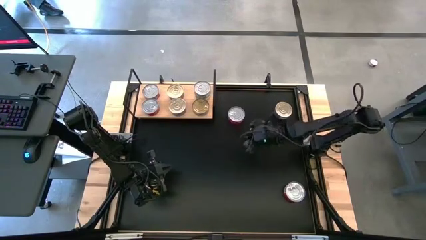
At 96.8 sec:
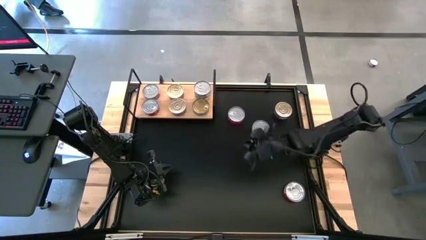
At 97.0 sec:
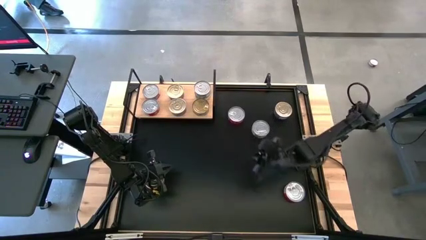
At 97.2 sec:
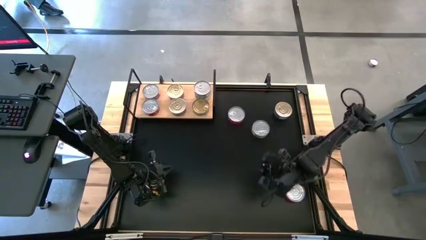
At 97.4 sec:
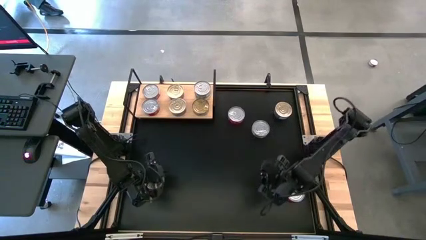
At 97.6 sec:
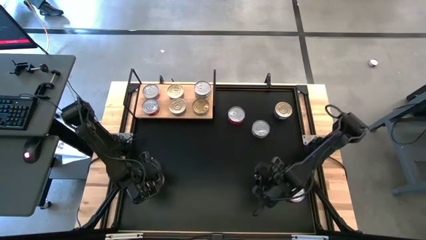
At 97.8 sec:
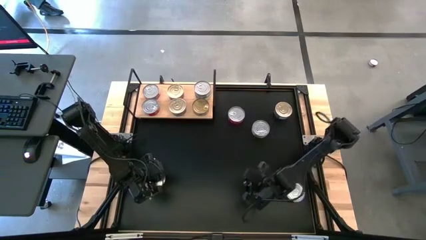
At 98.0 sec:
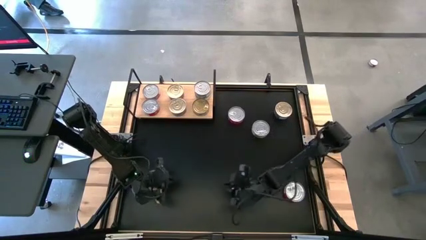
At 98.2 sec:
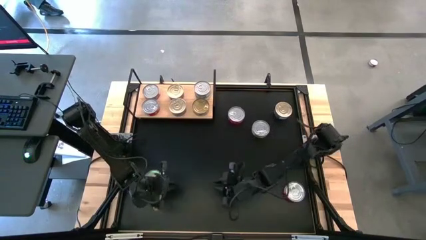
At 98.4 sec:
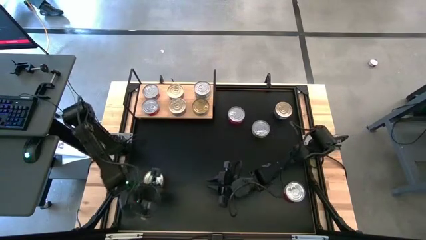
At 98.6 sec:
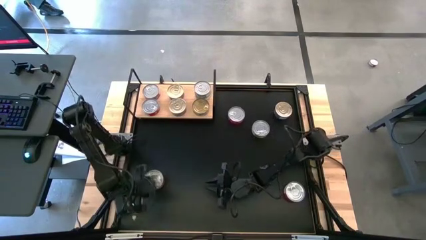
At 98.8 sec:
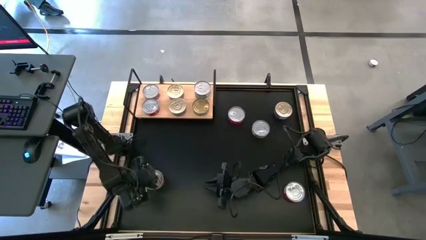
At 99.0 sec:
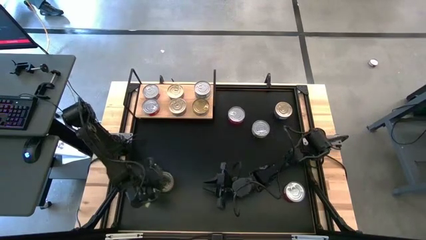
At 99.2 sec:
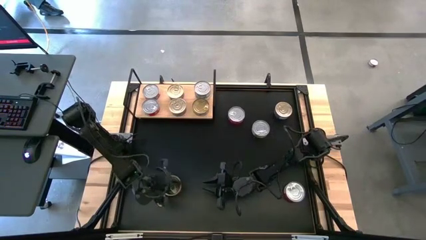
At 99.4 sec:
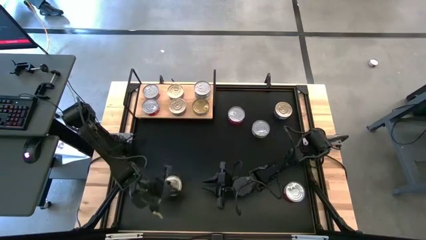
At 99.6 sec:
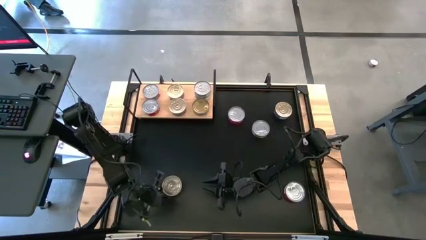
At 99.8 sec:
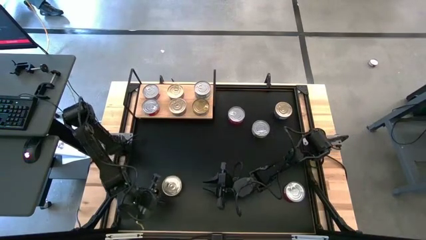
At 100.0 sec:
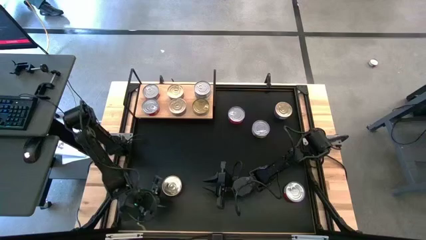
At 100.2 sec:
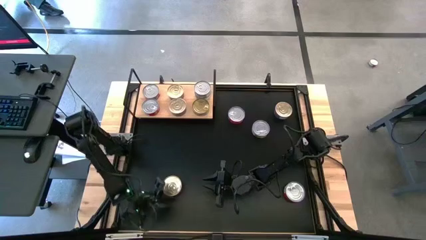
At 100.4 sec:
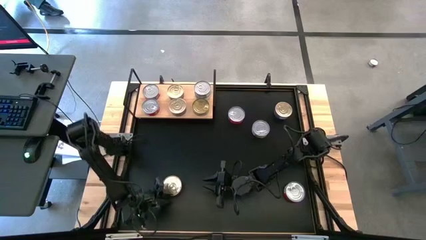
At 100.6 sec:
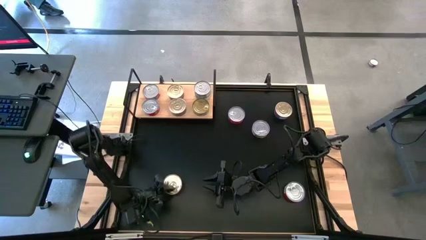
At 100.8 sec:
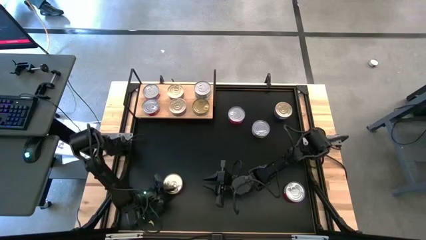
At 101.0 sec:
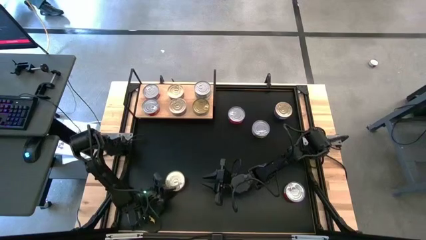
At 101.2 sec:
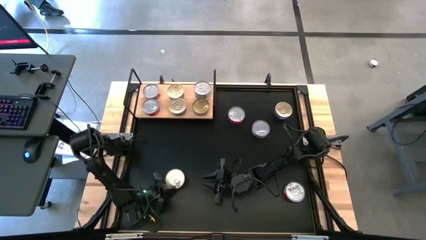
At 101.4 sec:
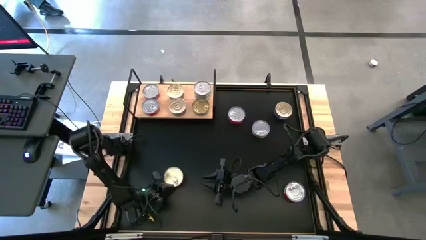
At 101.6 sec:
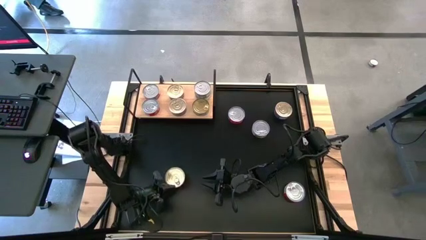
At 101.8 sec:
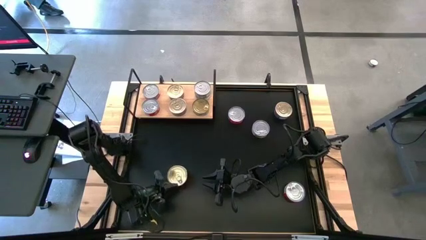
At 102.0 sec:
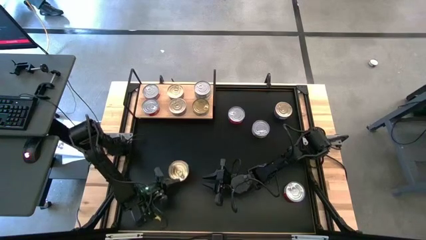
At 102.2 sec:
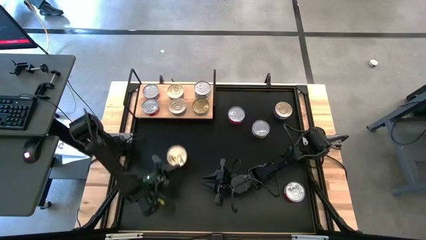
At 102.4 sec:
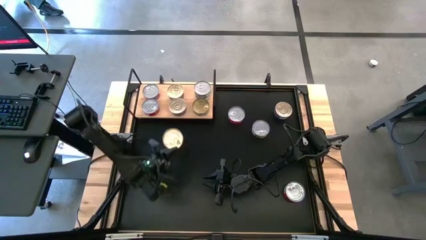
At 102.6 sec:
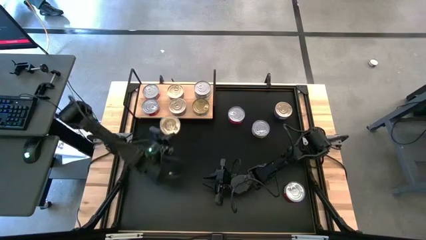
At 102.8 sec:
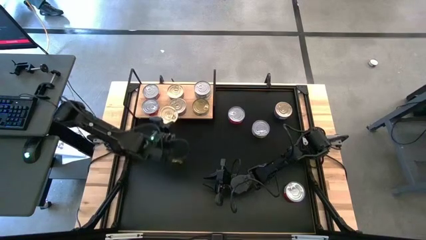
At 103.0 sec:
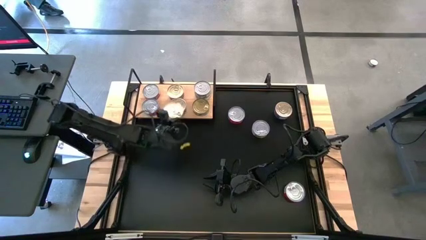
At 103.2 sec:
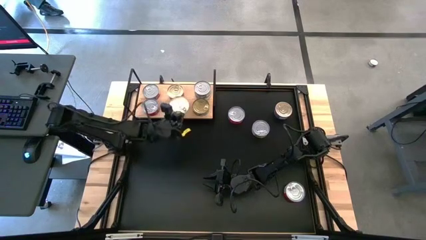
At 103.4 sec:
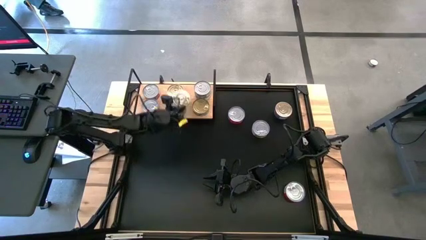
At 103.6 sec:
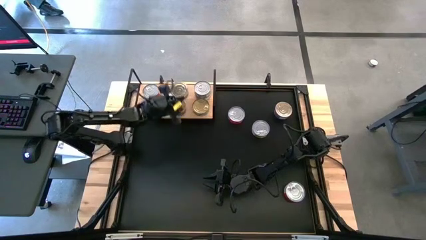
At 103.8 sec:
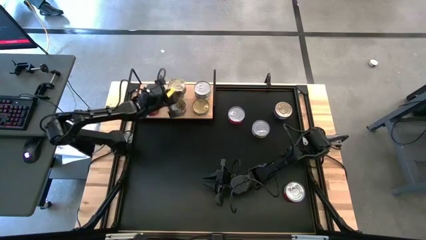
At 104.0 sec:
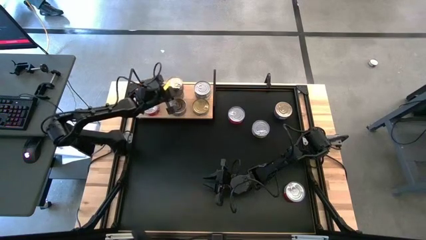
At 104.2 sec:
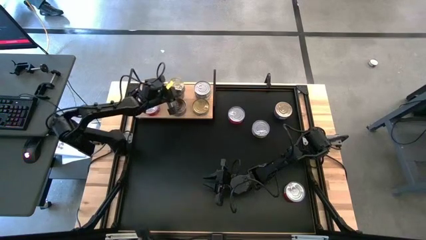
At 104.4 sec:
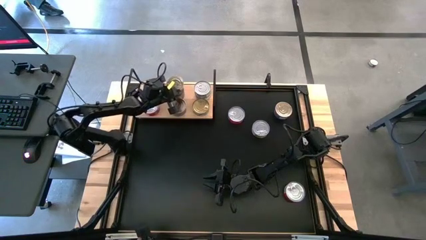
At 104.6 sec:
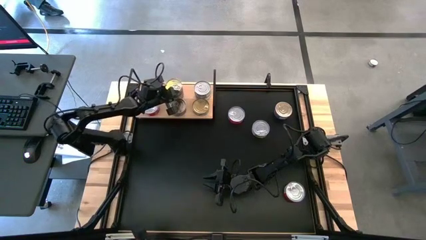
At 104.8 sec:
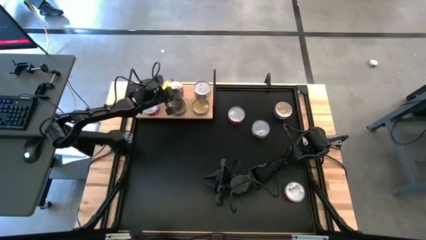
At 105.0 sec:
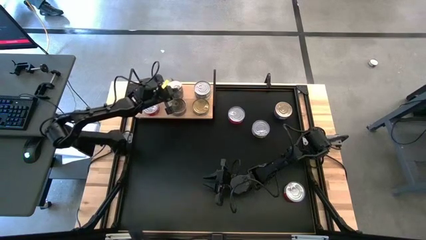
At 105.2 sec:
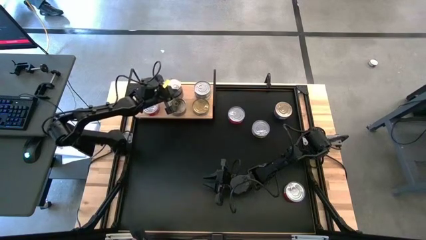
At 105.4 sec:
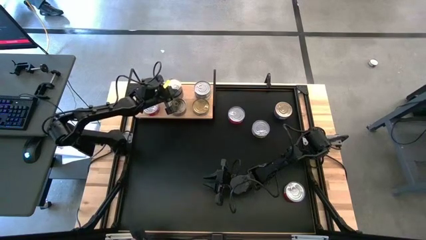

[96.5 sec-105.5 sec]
Task: Stack canned seafood by type on shelf
Stack the pink blue tuna can on the top of the other pink blue tuna can

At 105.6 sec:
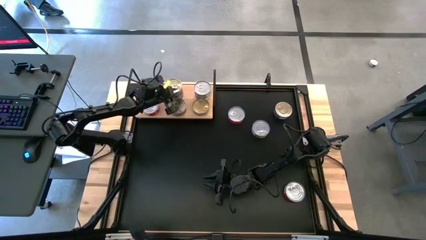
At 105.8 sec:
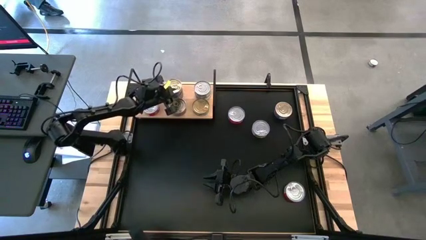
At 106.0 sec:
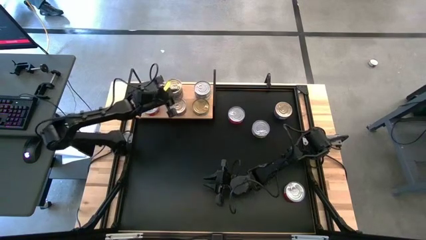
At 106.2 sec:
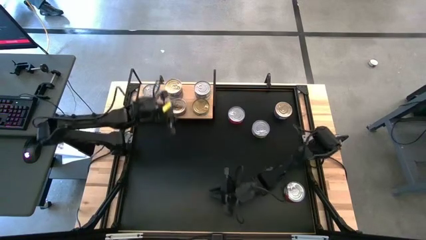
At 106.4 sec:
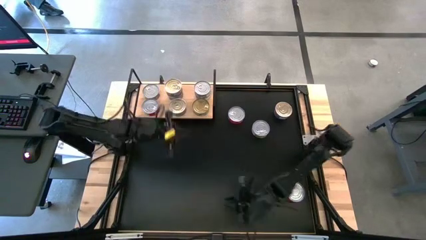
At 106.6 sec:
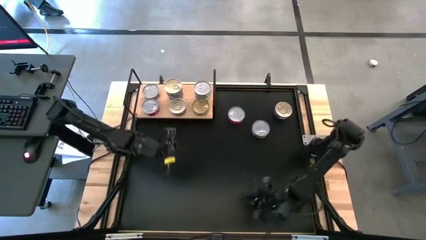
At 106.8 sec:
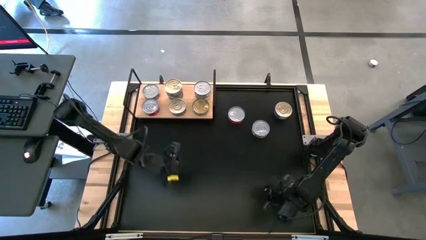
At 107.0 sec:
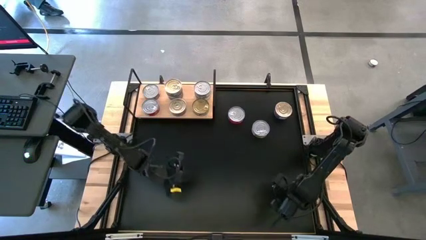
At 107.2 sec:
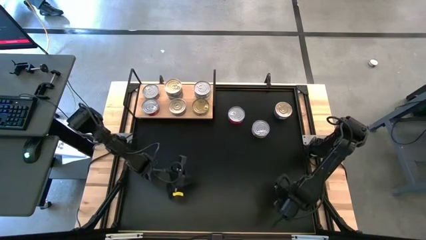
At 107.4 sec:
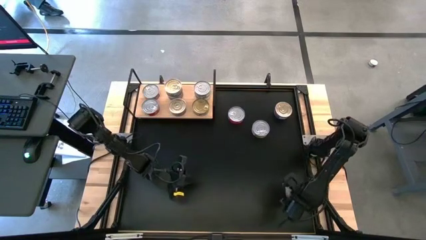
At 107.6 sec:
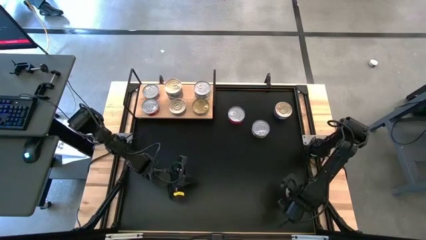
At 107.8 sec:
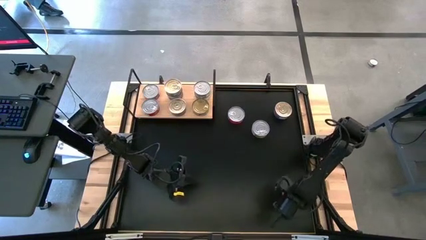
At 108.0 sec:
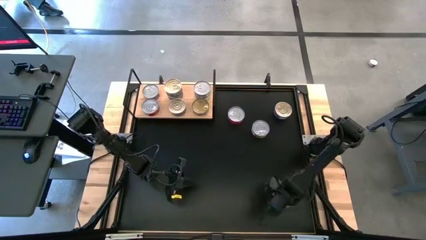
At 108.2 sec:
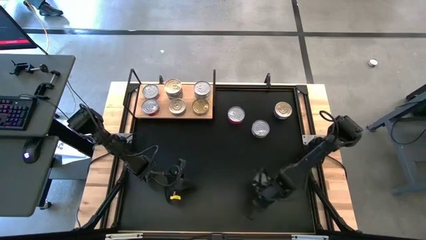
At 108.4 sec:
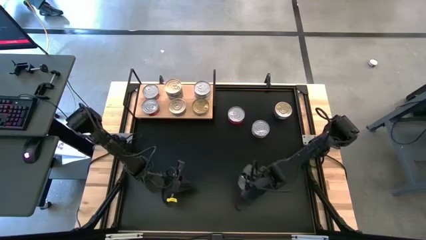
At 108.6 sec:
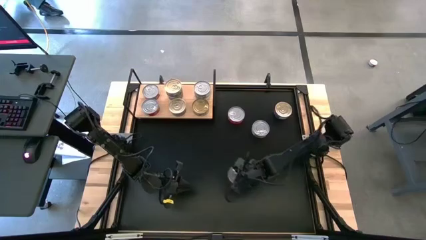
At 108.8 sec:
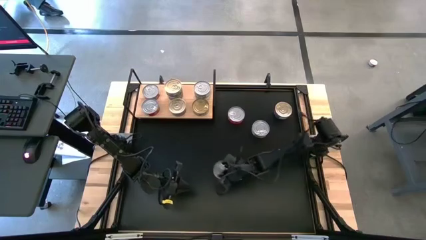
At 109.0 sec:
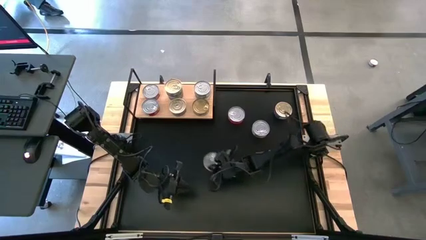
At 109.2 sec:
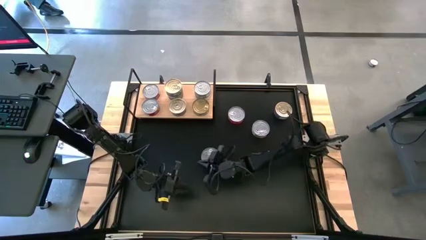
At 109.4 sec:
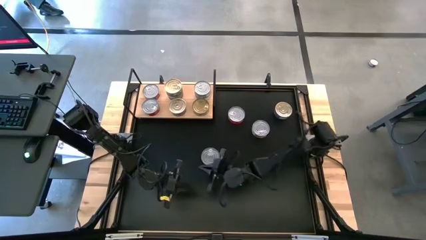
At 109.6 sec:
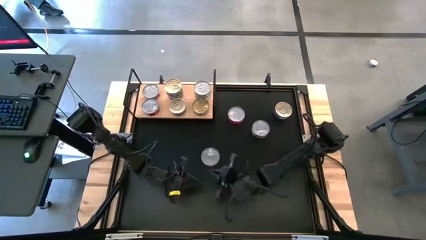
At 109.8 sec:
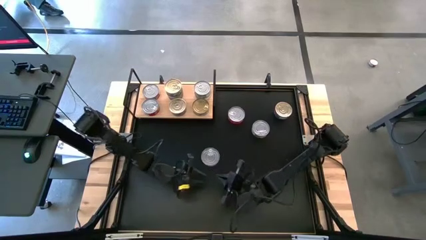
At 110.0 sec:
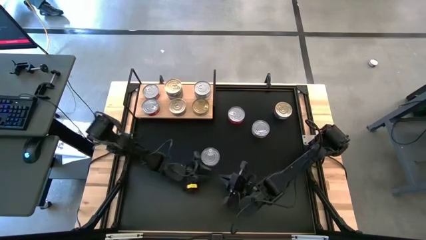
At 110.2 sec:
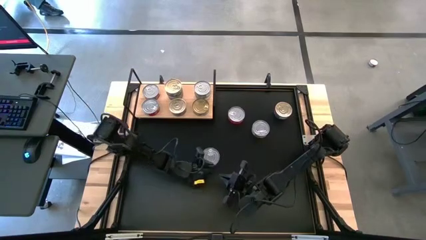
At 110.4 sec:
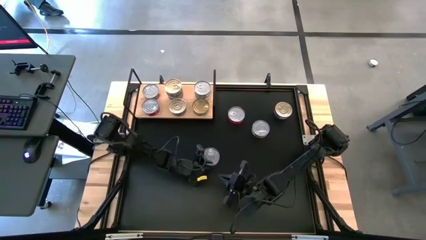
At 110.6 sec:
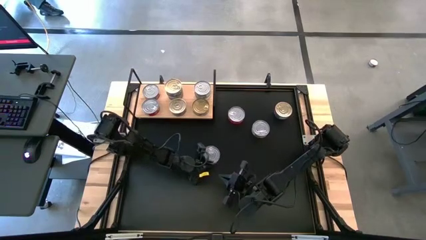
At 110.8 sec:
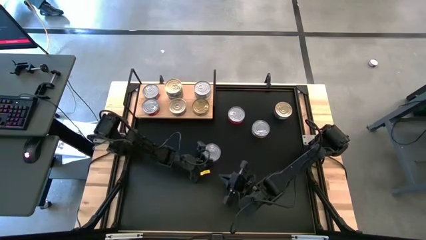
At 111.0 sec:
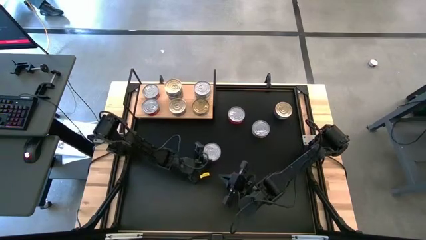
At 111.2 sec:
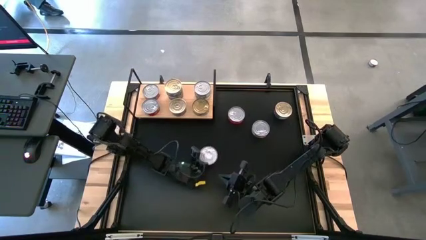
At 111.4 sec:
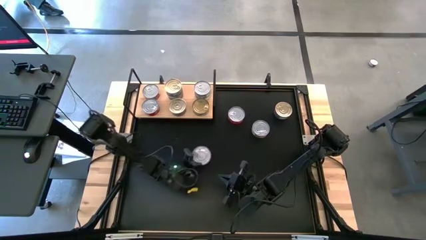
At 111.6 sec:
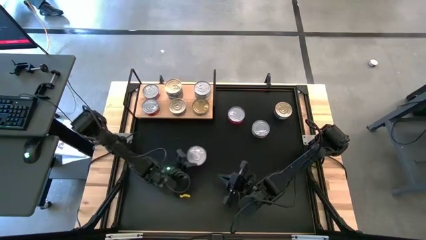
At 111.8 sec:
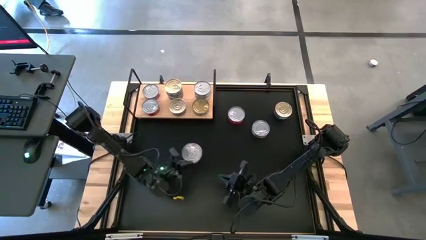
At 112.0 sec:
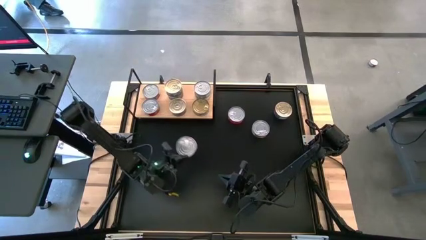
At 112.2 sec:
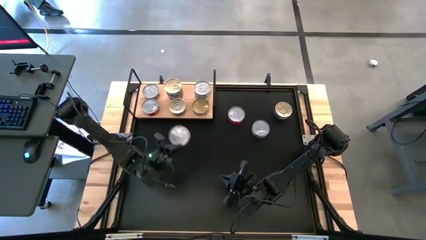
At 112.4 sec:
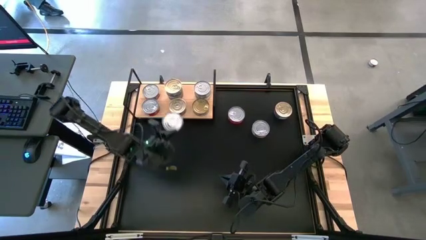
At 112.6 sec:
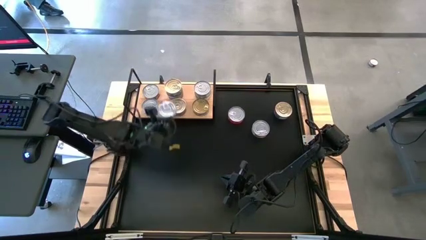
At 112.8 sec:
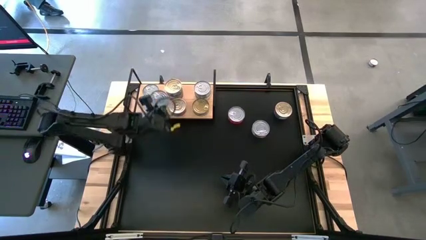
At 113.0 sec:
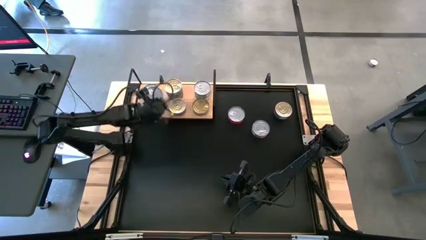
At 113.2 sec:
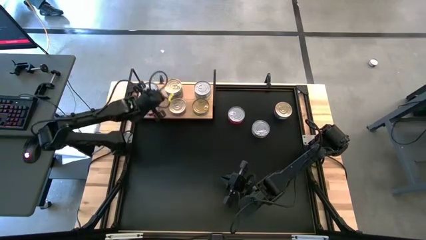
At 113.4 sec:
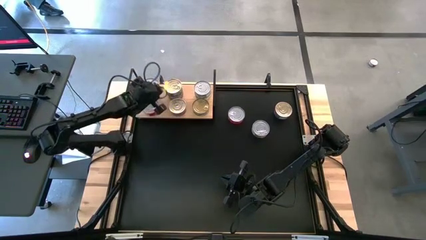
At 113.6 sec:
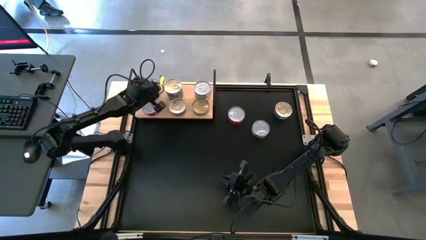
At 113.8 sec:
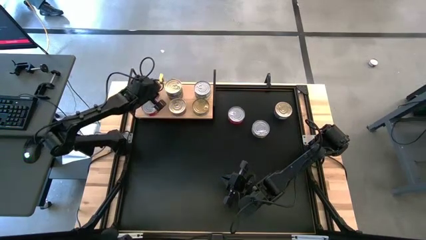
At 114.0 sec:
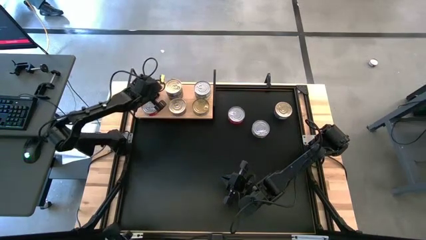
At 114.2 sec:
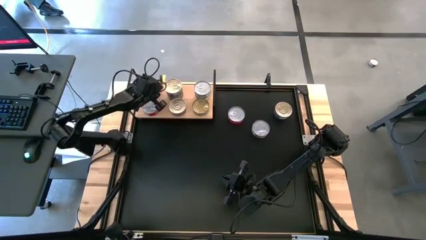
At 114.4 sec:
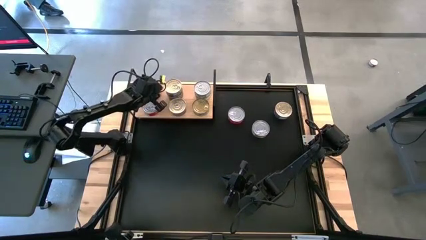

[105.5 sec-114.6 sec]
Stack the red tuna can on the top of the other red tuna can
